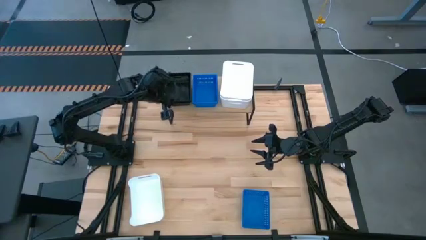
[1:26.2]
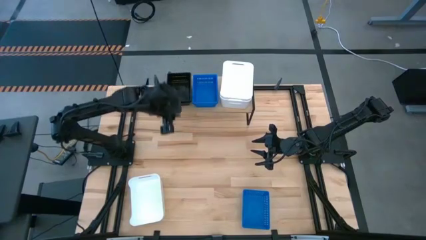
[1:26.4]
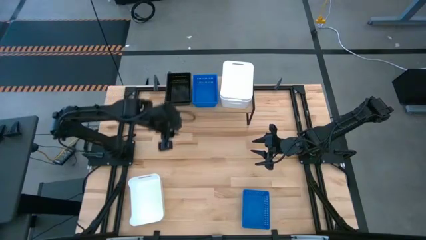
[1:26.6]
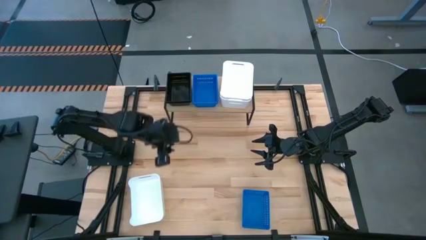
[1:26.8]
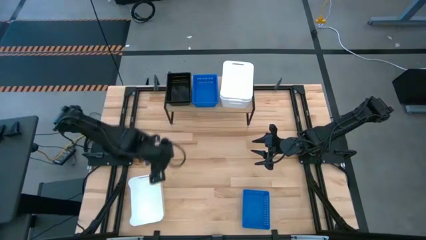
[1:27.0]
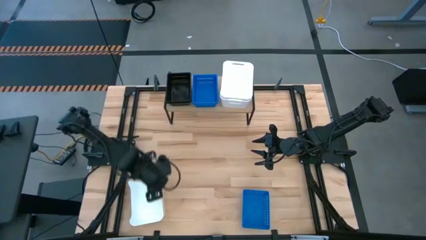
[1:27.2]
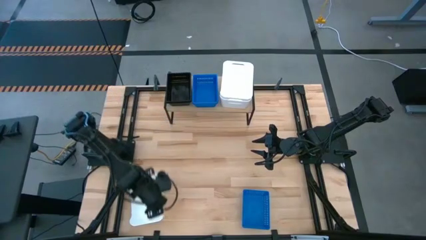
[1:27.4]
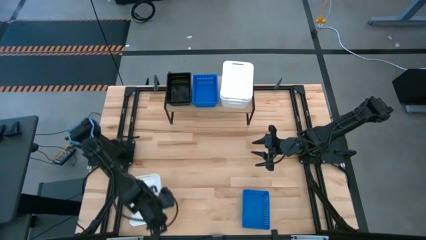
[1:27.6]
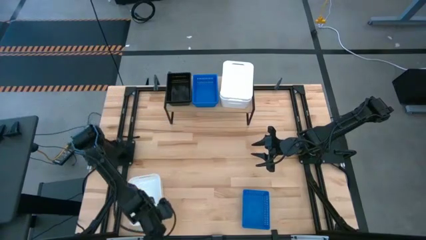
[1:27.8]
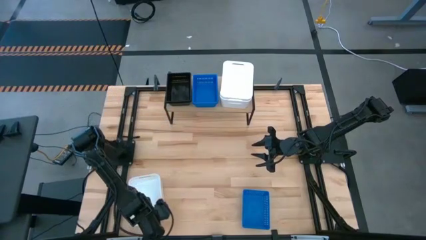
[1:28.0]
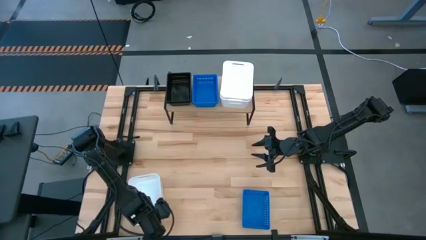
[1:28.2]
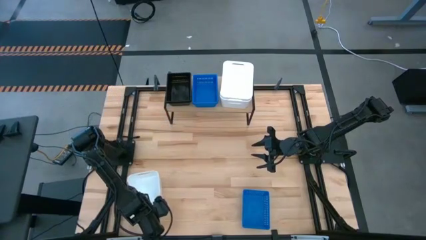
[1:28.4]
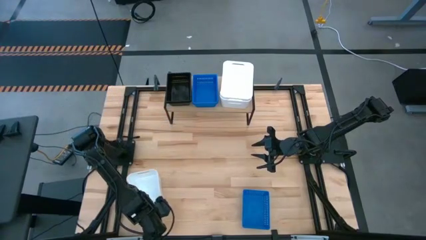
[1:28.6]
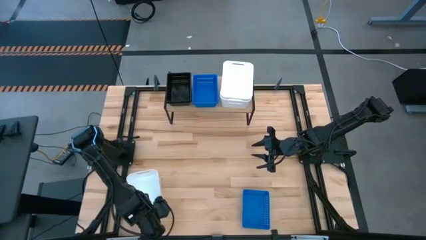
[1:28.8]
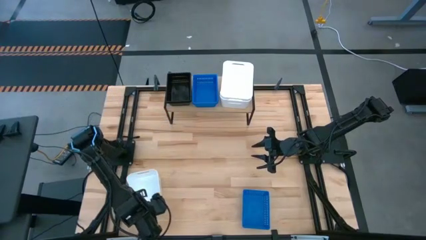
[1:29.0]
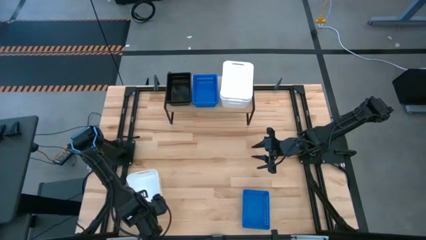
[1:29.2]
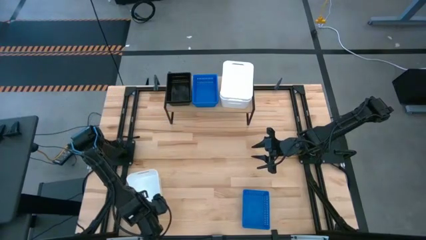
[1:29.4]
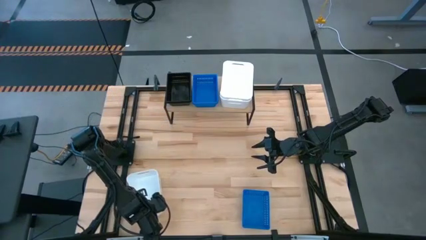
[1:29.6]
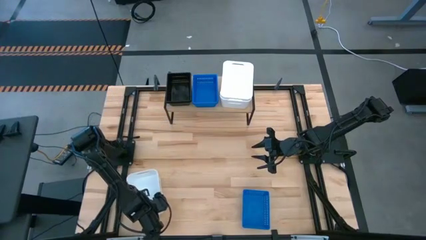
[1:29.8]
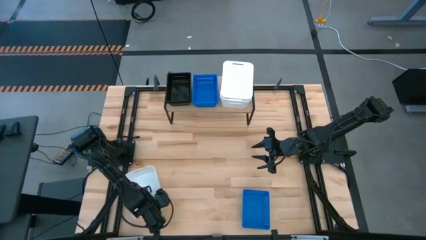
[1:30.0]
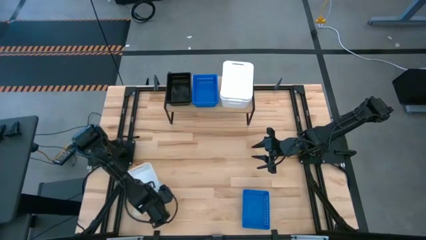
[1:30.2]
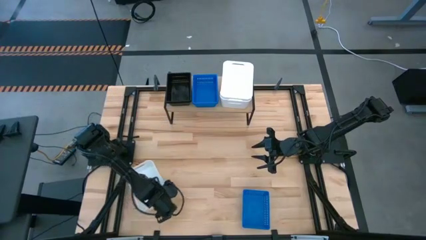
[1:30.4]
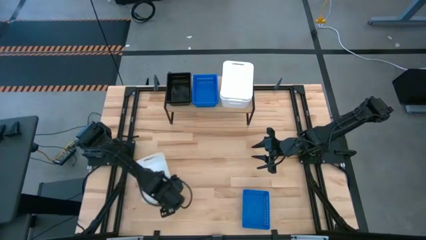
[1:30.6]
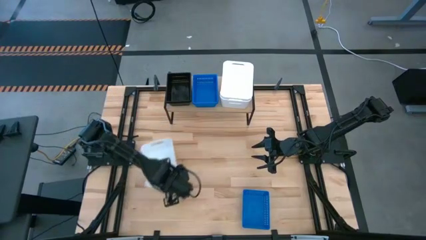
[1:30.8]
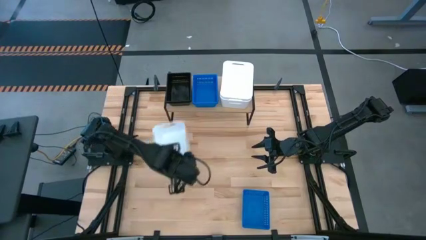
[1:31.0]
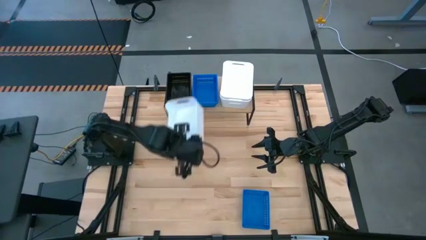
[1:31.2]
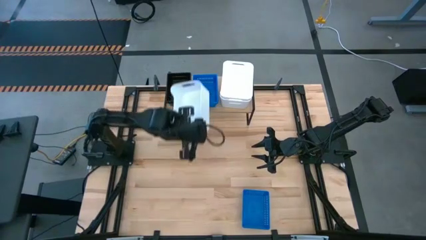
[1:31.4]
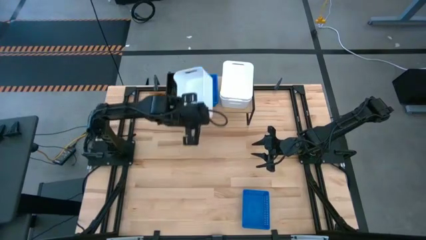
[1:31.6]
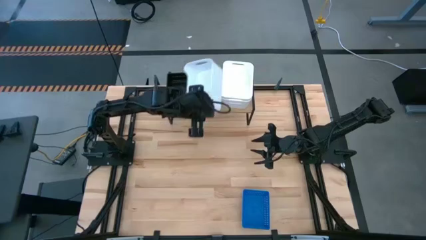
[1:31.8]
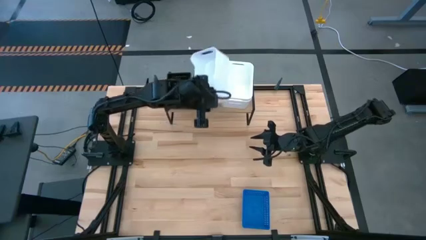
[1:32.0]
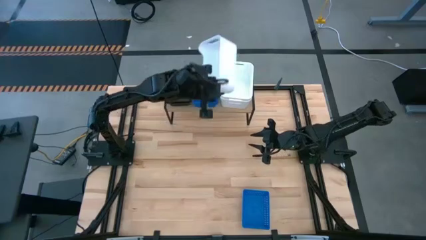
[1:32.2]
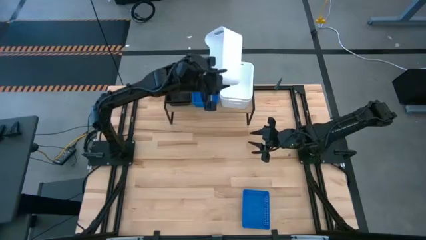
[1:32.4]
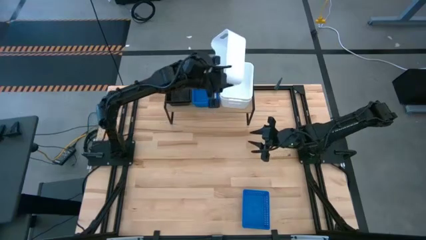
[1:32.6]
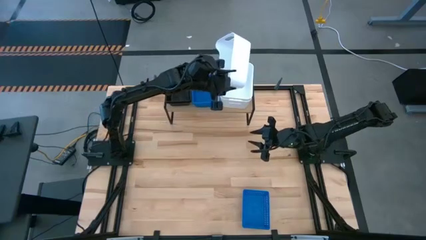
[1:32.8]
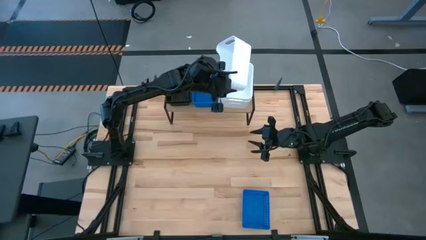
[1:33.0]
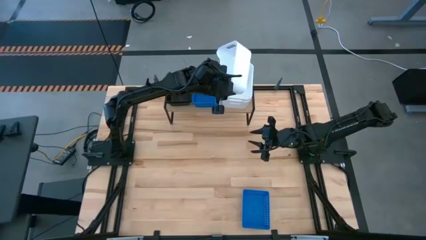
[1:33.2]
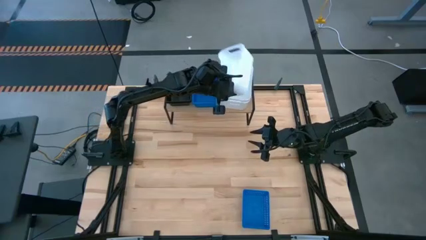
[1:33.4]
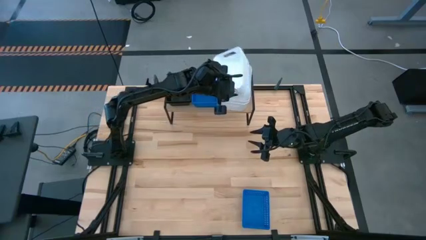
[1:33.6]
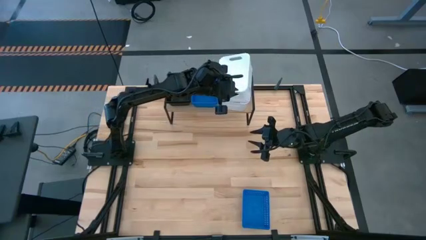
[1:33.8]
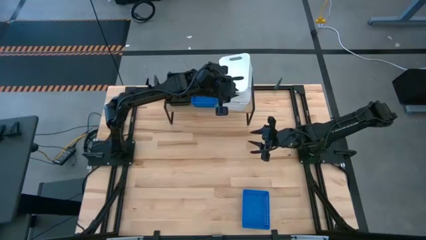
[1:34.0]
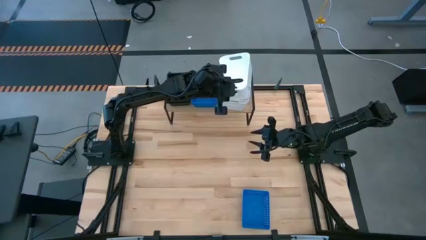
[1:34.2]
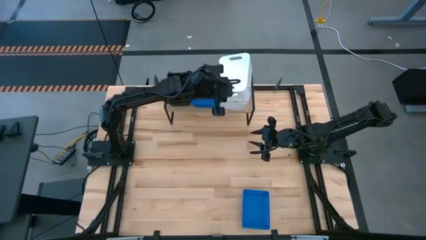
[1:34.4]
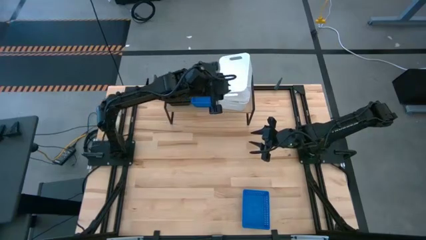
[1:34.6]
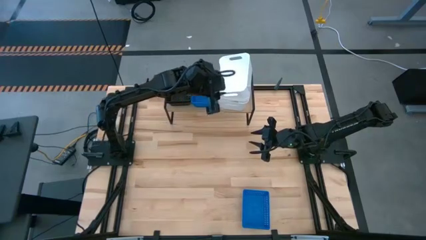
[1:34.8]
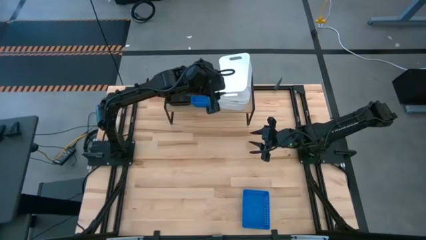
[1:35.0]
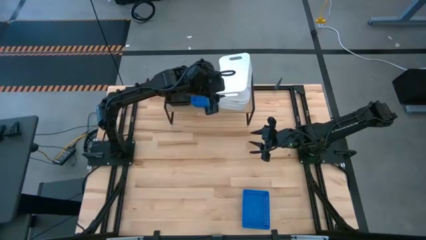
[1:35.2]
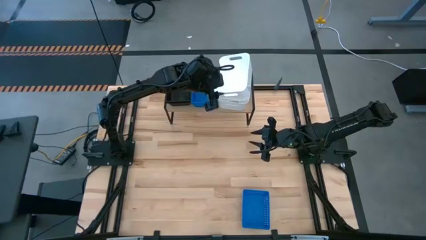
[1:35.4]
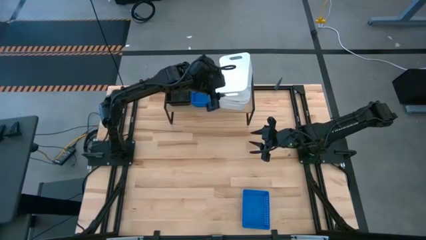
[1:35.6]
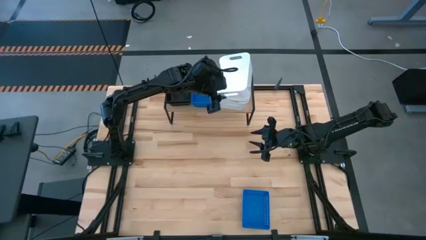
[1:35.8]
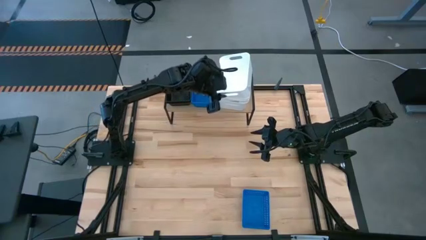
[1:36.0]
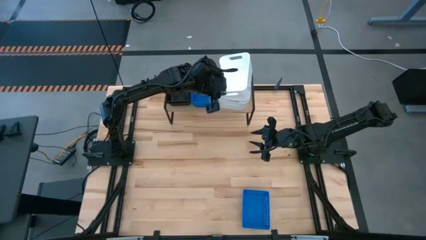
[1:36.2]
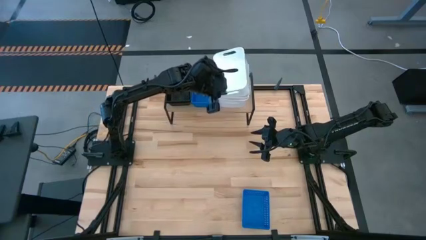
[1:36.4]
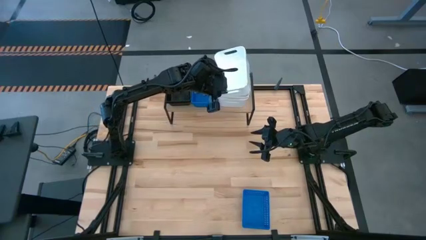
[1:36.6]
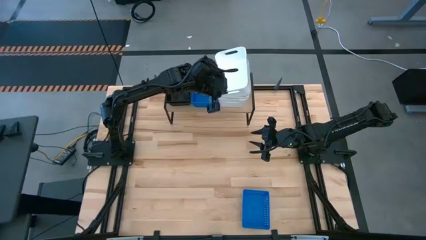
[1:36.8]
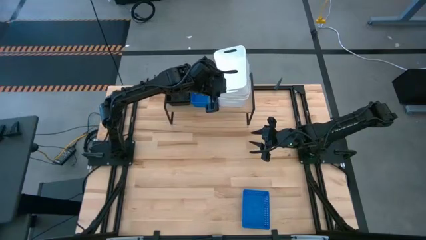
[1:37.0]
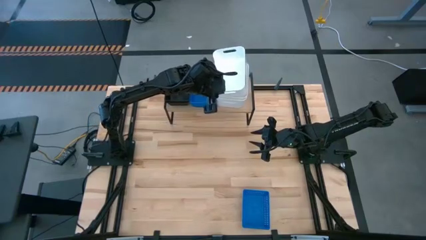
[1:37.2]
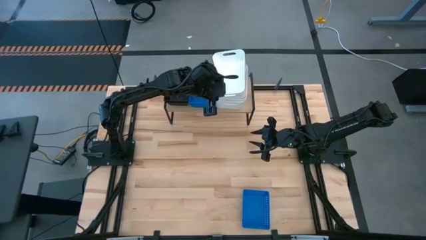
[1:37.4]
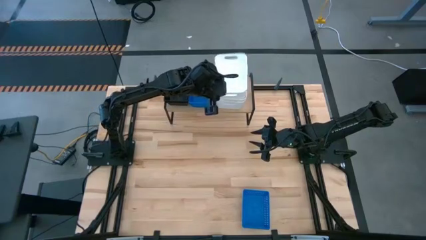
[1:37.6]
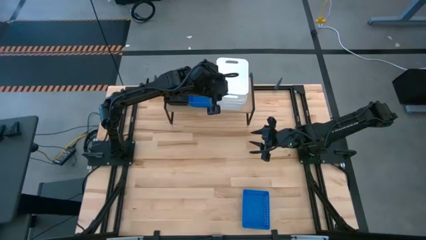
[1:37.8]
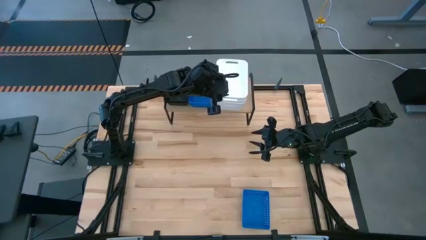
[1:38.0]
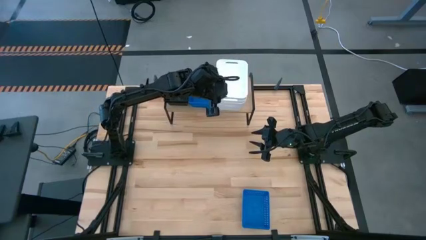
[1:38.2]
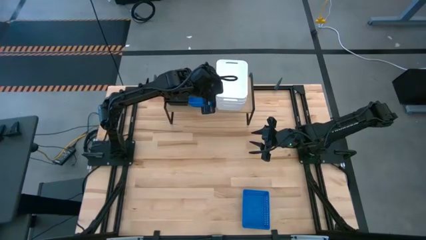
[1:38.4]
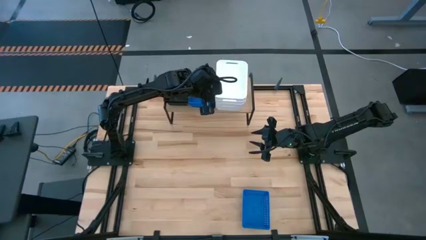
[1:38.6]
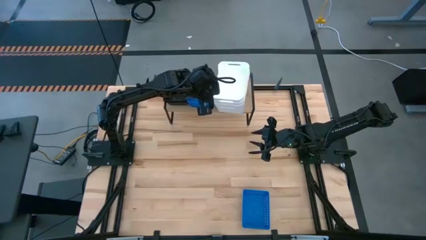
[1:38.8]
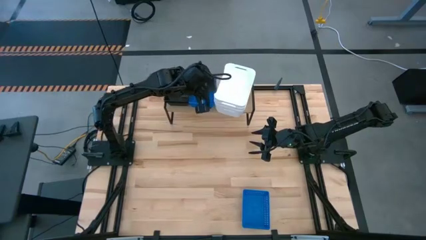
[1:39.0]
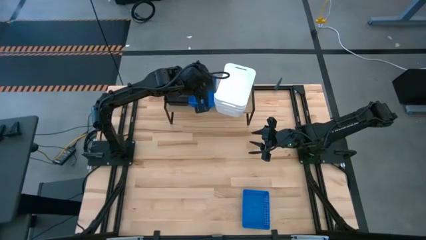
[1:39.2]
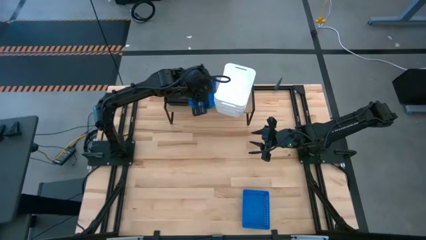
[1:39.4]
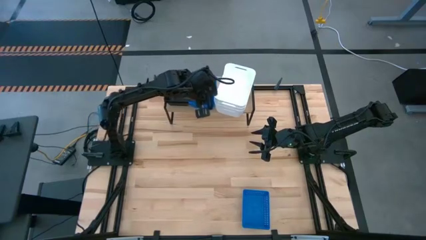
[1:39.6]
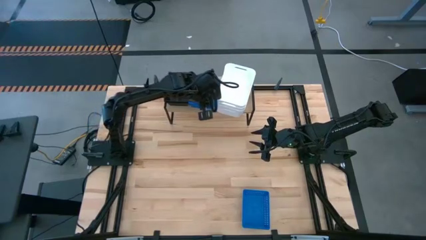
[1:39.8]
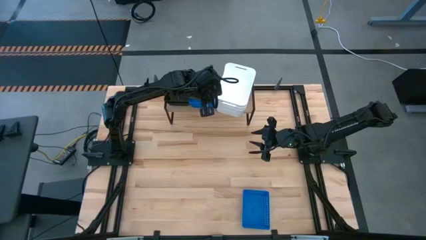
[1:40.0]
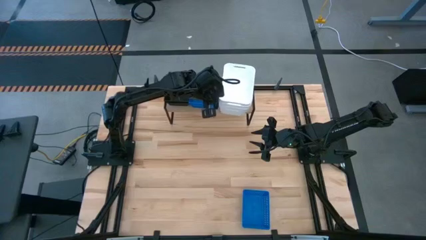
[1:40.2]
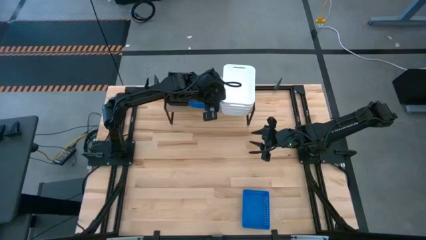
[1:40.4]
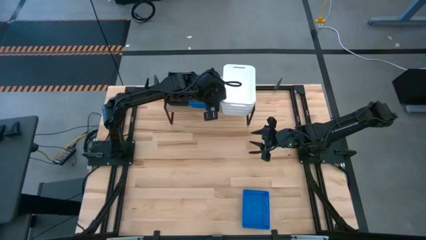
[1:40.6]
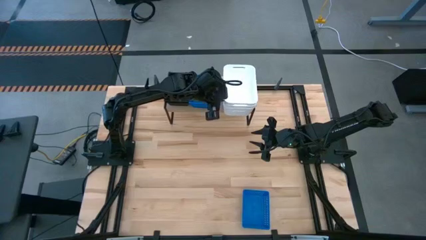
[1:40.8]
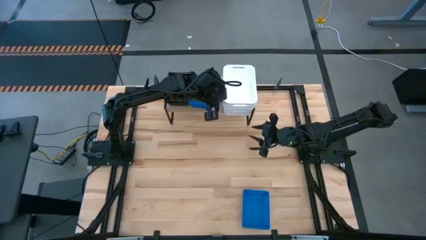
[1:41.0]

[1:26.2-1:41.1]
Task: Stack baskets on shelf by color
Stack the white bin on top of the other white bins on the shelf

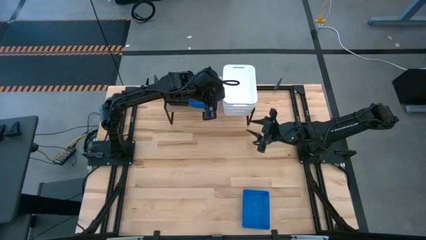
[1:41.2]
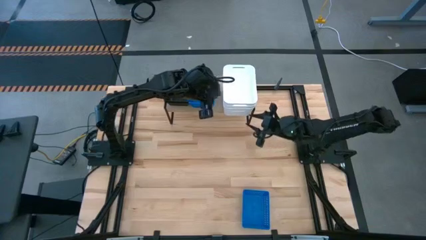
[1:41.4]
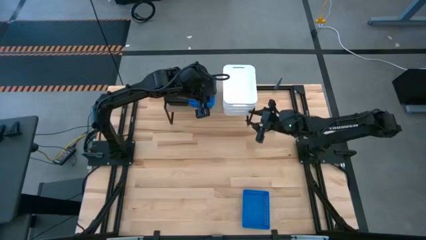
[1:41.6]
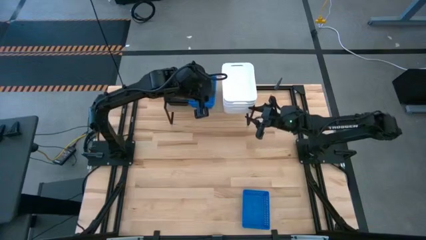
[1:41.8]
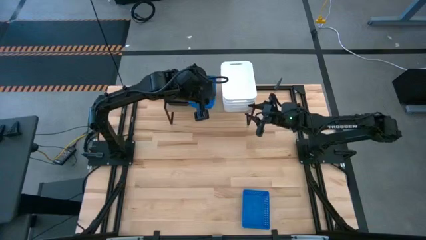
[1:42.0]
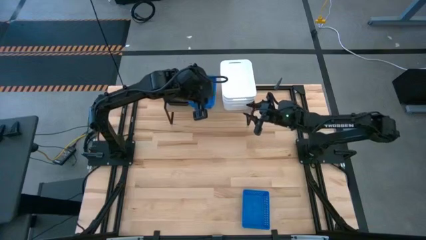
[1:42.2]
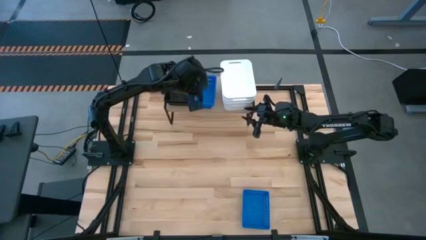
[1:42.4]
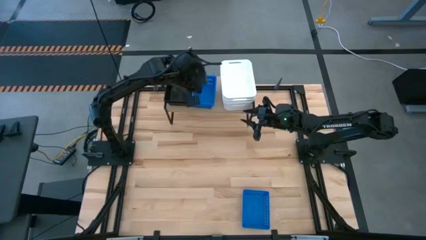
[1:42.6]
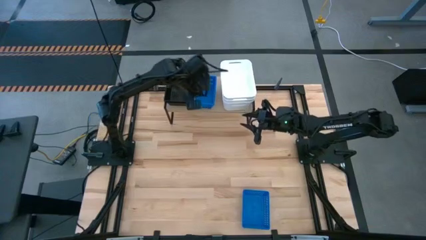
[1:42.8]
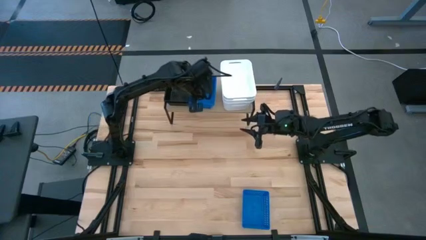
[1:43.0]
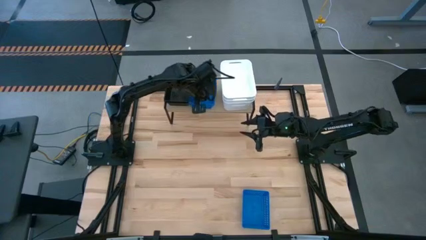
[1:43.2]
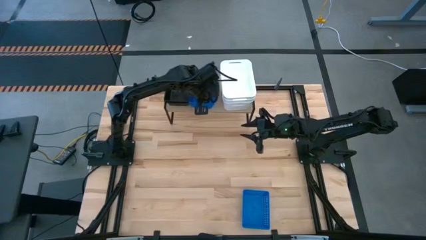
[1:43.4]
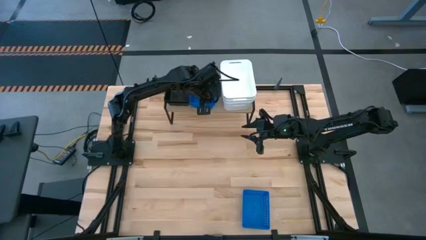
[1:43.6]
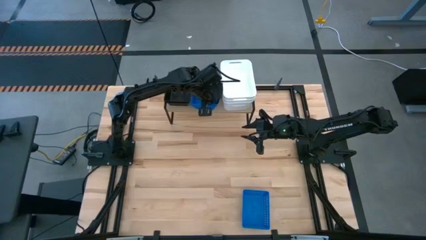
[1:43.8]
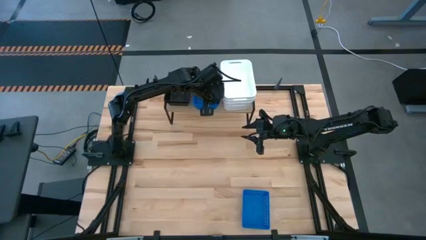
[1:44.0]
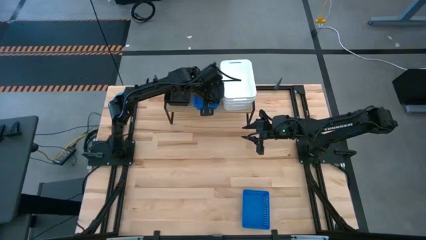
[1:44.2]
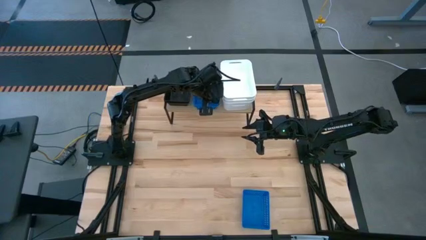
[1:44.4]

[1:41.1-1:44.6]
Adjust the stacked bins on the shelf
